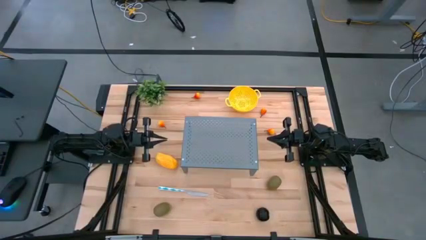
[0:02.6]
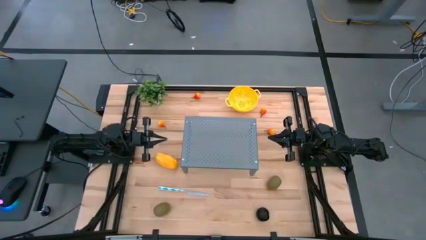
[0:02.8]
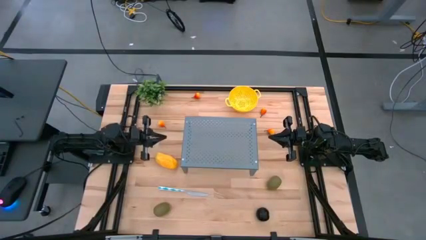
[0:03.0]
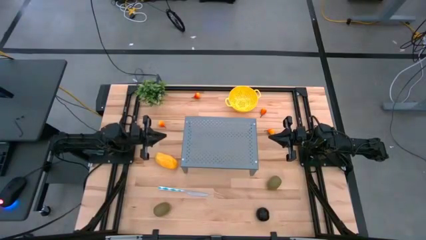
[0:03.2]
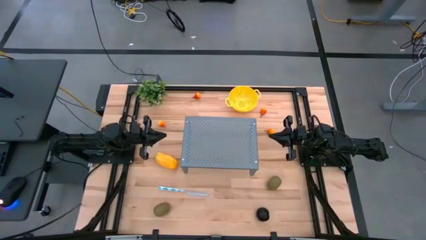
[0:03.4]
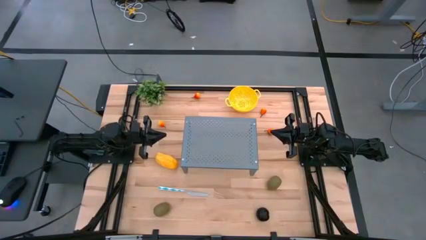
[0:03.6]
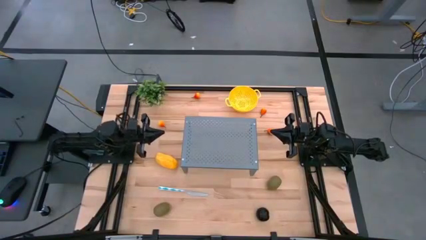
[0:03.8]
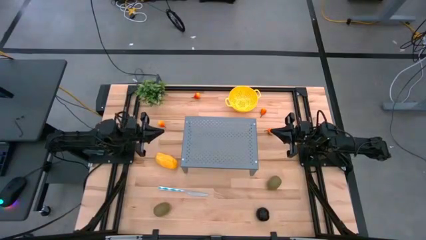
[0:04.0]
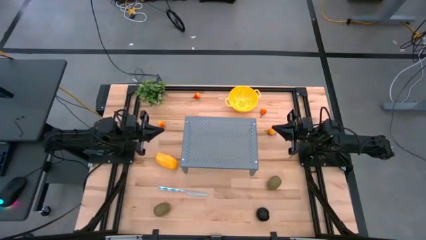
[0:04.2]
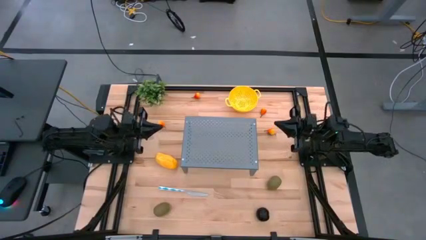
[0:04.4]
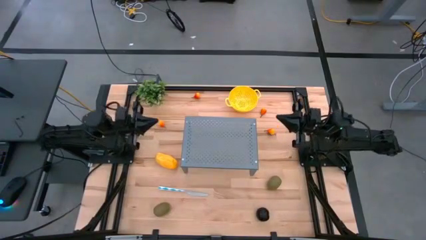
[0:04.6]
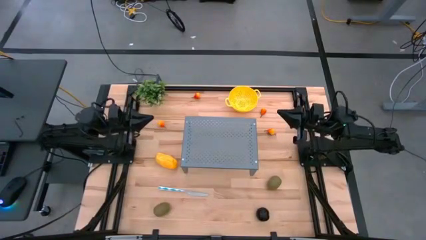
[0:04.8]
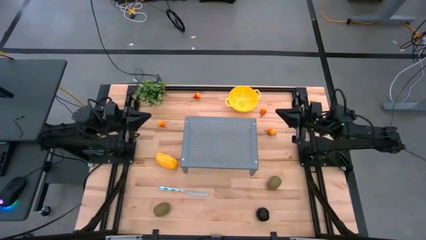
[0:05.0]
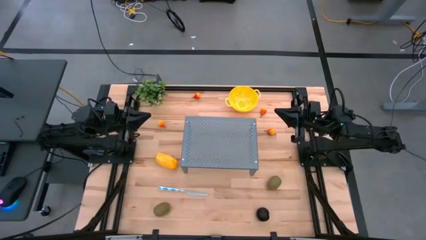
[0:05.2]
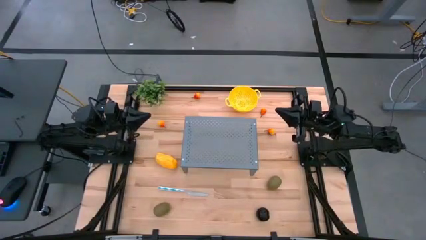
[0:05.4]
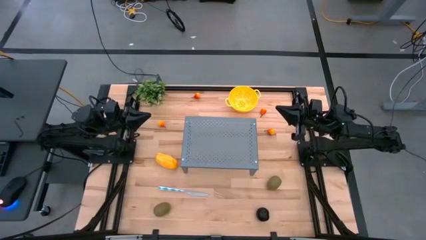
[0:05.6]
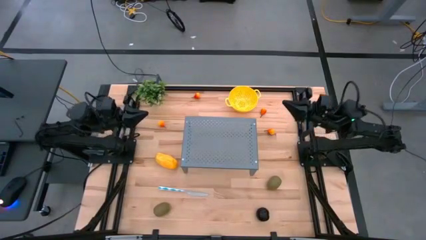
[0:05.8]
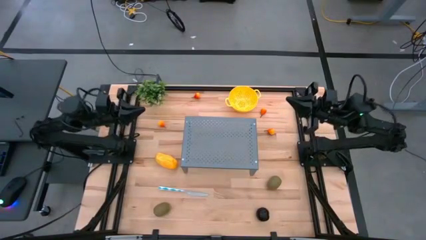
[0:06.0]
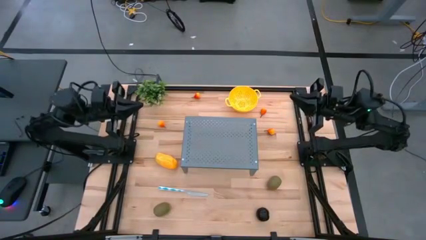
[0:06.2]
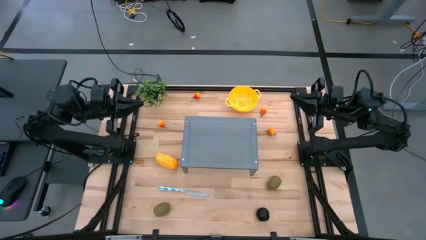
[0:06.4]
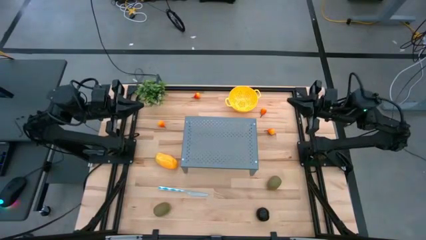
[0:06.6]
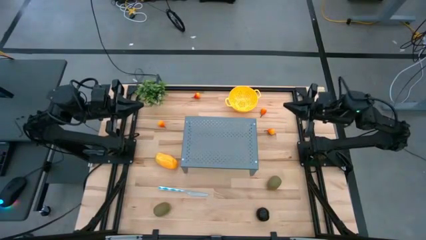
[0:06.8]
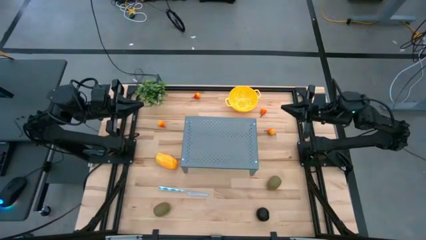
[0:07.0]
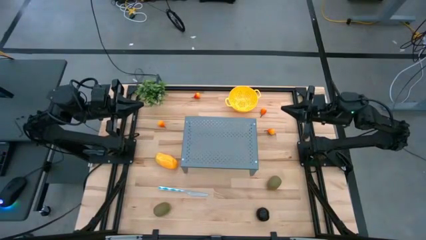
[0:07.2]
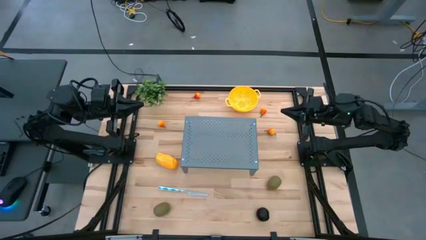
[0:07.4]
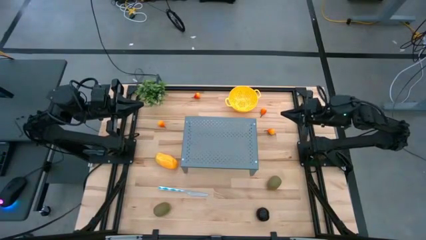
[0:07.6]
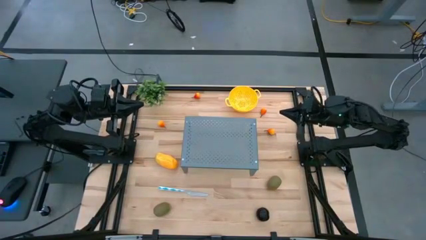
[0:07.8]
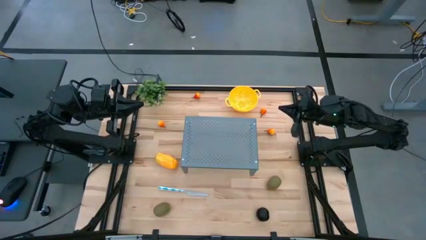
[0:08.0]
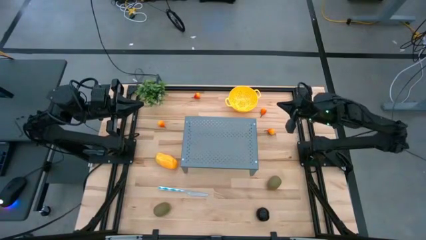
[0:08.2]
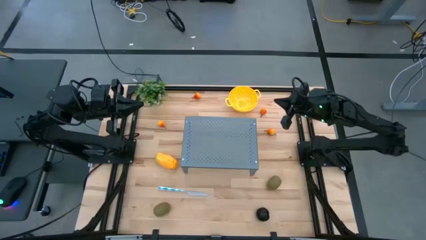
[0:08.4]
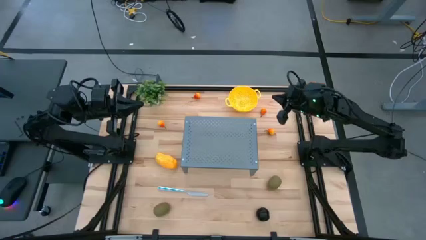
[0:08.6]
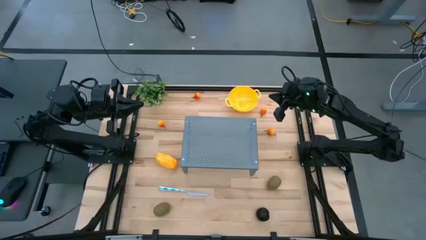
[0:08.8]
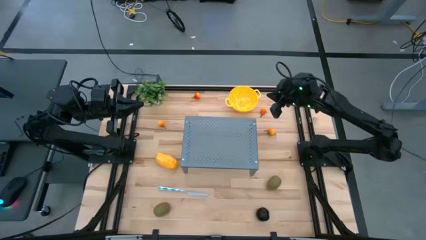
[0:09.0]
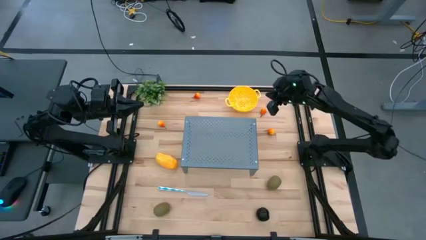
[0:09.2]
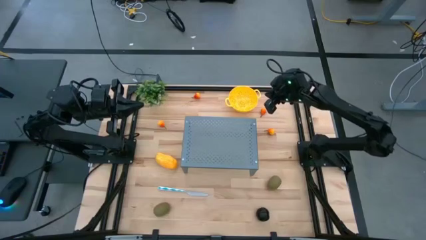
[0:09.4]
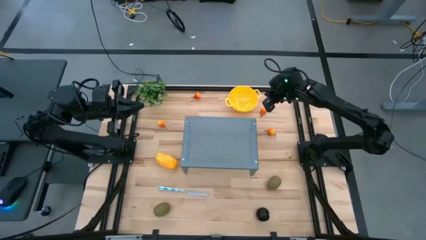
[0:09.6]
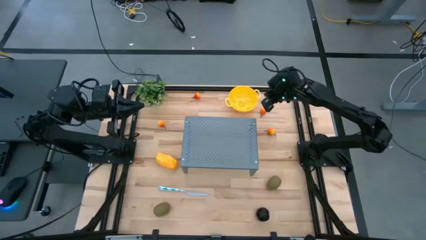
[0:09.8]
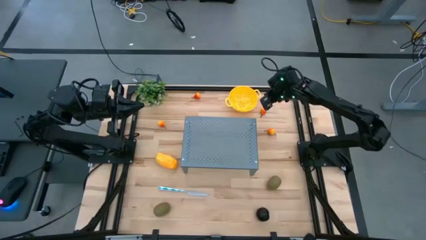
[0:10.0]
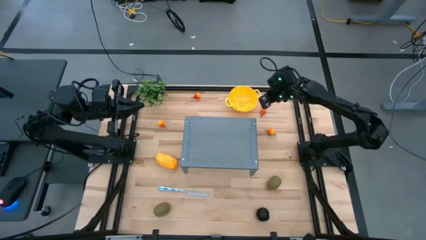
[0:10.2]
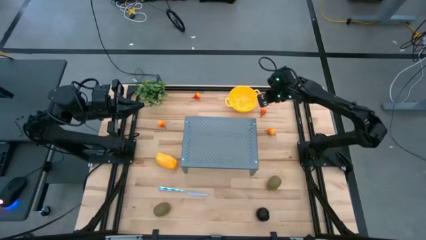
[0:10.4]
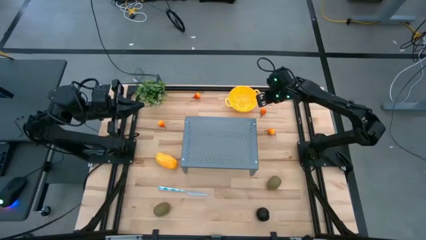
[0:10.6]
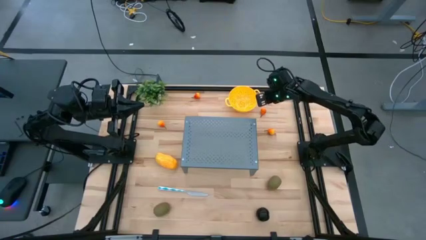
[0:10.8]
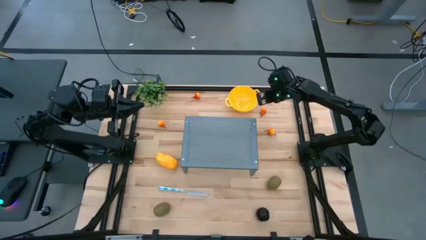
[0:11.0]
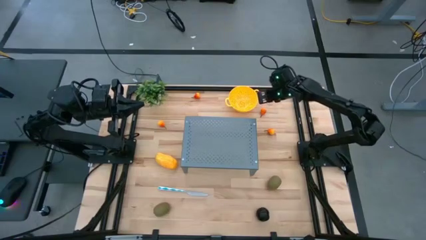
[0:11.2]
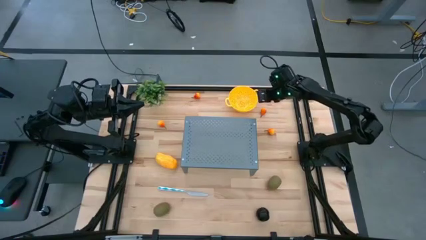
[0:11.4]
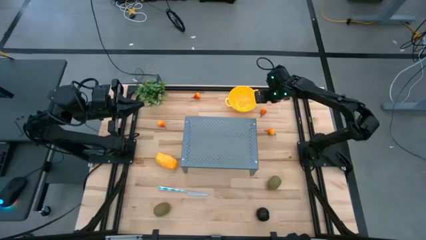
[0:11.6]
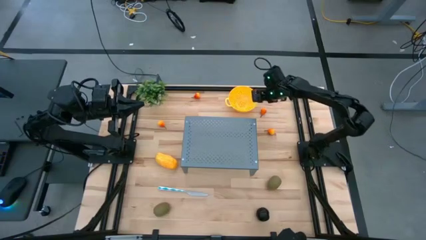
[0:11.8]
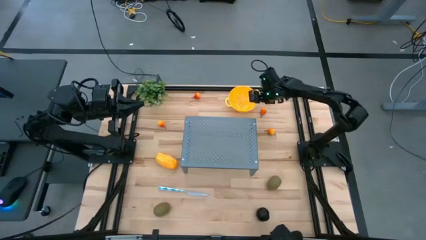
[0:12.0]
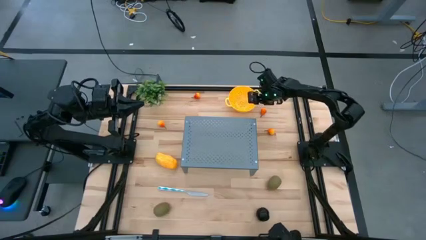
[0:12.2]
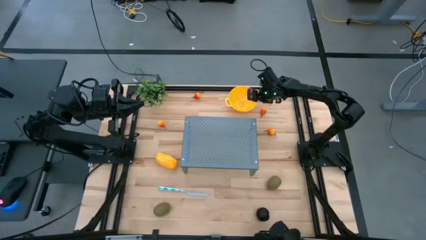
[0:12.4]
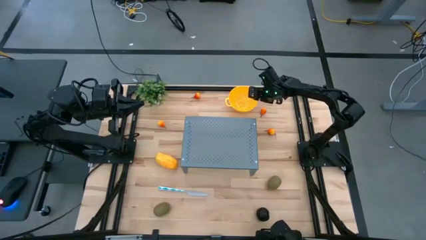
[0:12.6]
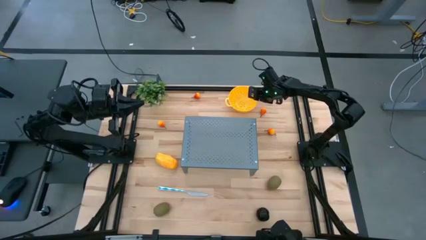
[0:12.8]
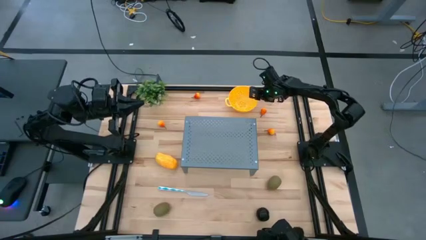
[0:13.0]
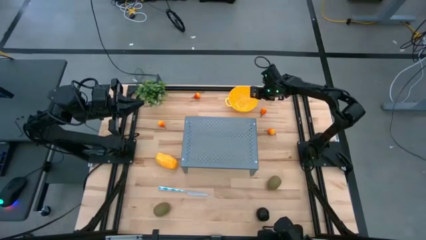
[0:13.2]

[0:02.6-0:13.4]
Task: Pick & Place Fruit
Put the strainer bowl on the shelf

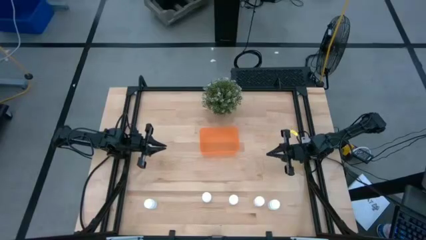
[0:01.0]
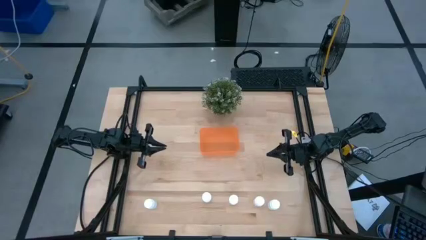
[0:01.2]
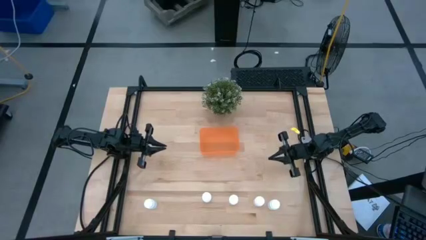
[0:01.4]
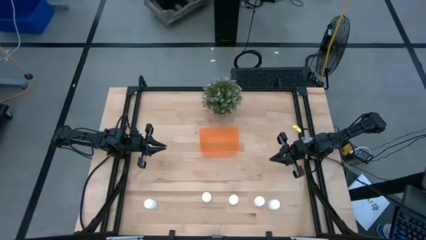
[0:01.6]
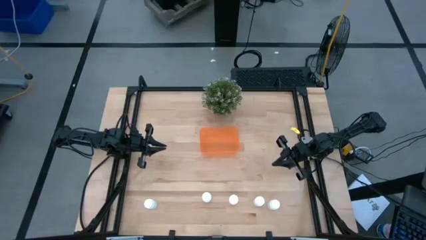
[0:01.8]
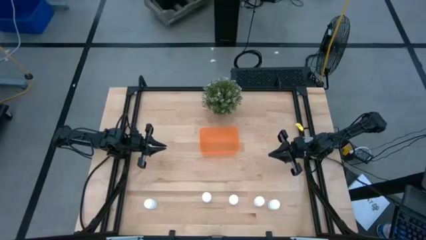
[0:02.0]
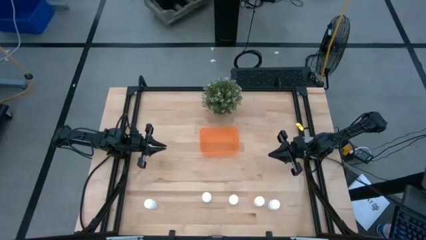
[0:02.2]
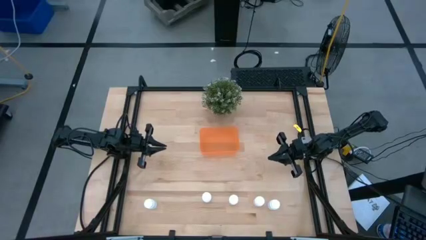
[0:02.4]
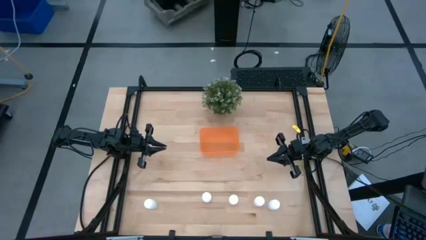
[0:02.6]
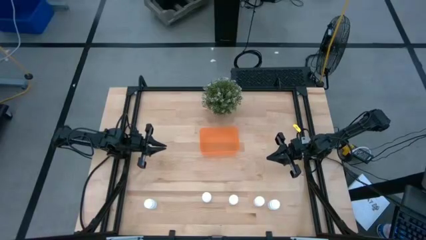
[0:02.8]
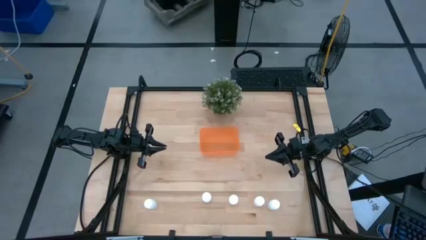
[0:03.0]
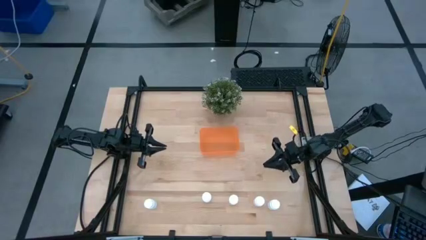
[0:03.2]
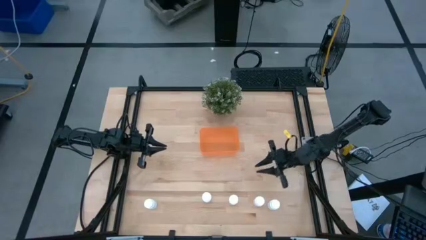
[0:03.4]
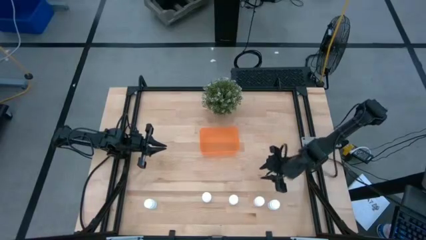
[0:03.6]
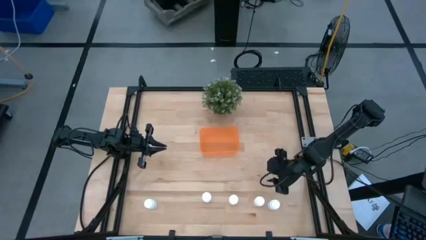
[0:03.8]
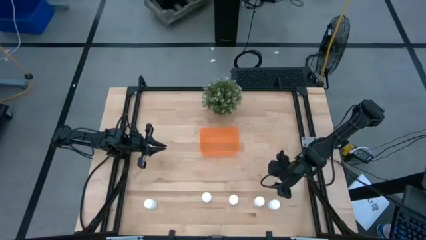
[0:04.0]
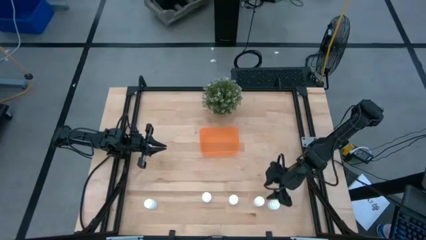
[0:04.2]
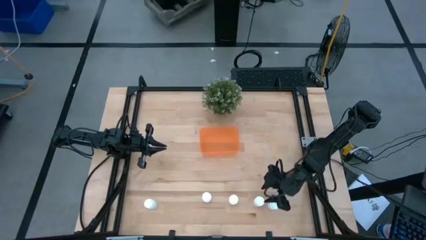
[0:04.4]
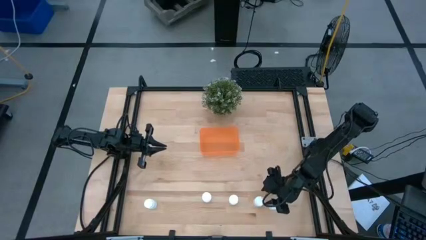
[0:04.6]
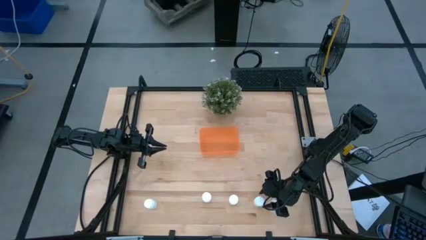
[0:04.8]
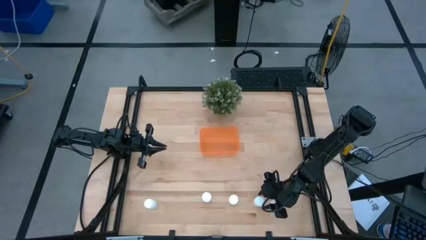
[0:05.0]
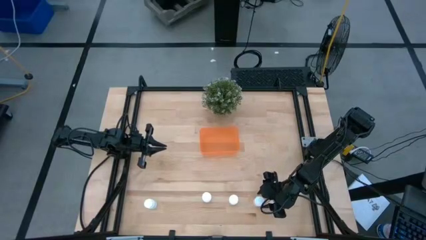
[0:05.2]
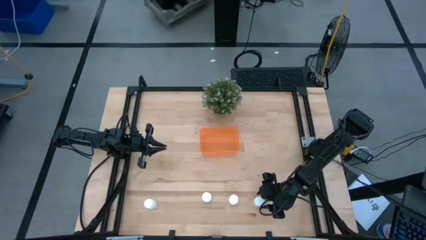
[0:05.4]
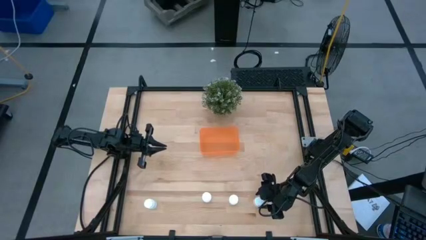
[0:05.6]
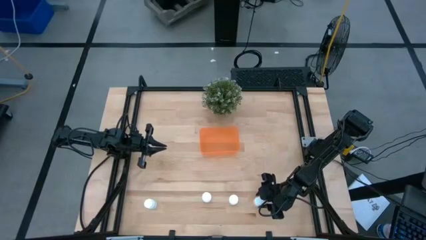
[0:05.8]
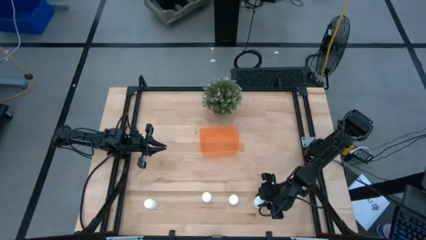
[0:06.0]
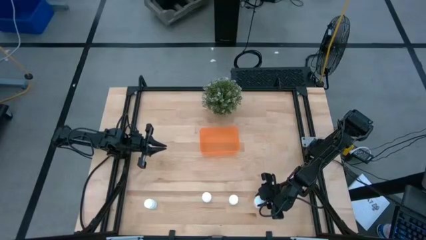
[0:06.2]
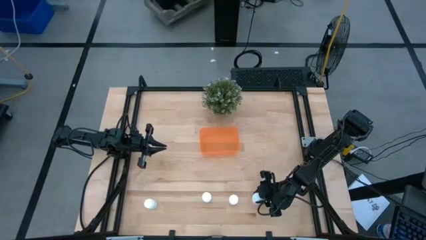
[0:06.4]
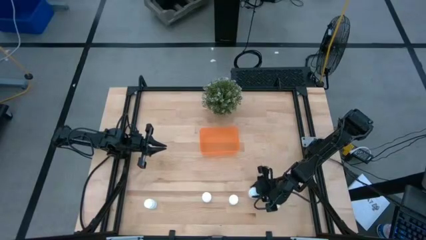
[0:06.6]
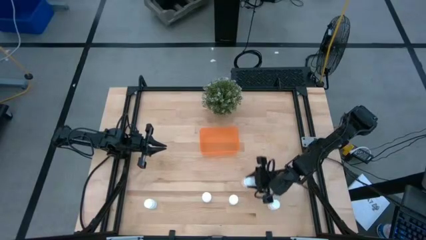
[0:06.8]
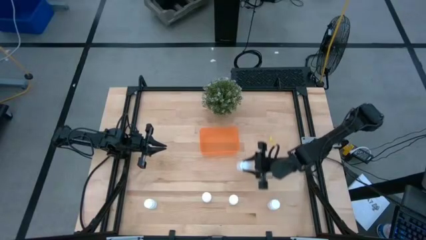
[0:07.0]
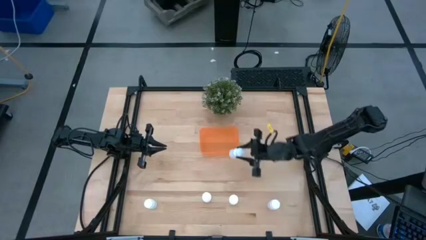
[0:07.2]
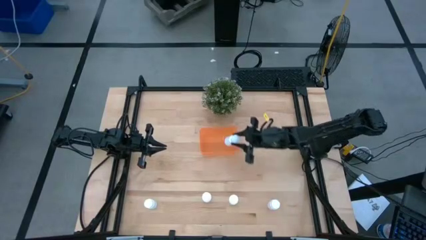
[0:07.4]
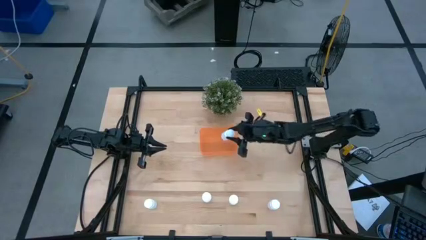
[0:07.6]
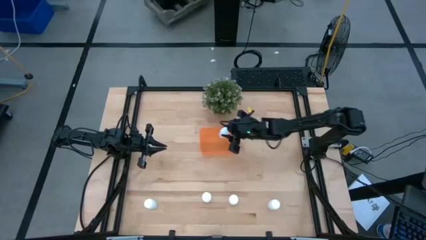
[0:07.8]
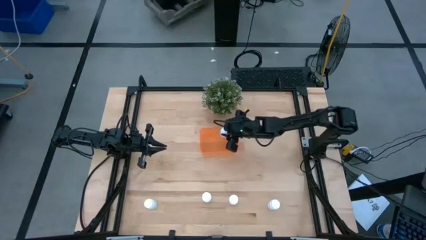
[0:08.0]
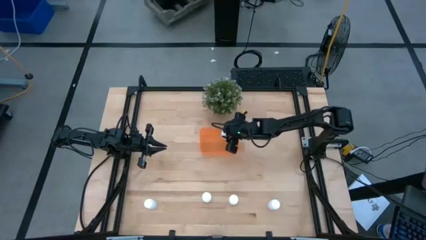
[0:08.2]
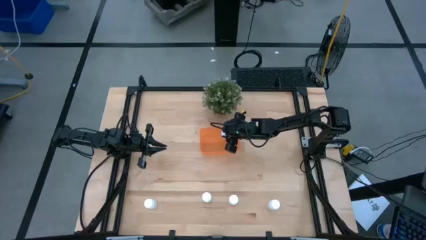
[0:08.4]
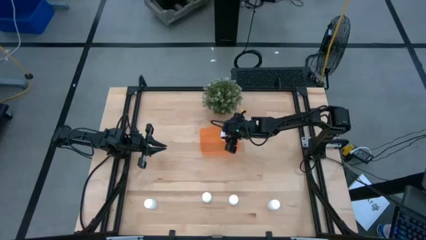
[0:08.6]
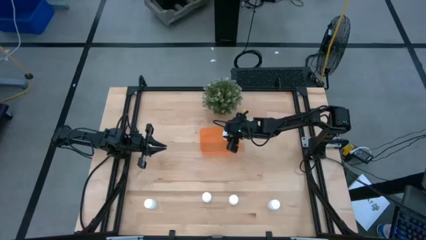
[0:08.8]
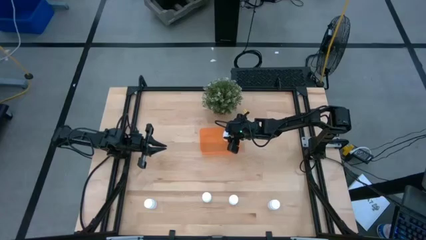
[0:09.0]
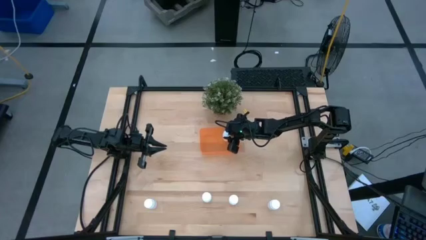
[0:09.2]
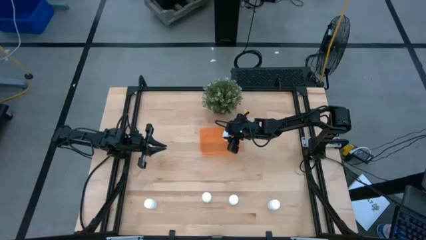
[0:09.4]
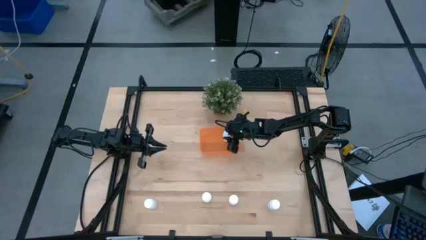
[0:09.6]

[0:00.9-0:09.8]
Task: Pick and place pill bottles into a basket
Put the white pill bottle into the orange bin
